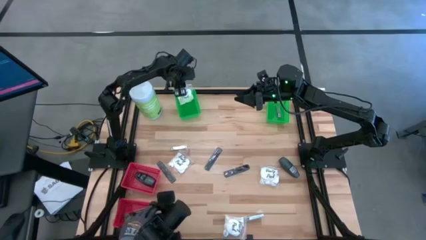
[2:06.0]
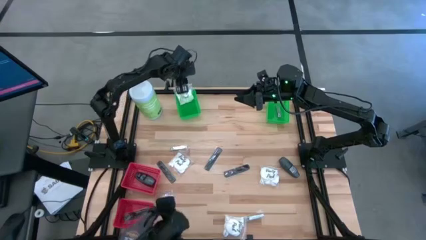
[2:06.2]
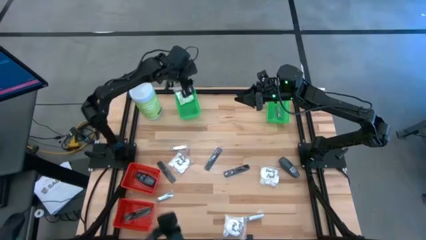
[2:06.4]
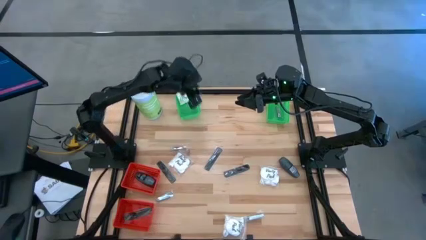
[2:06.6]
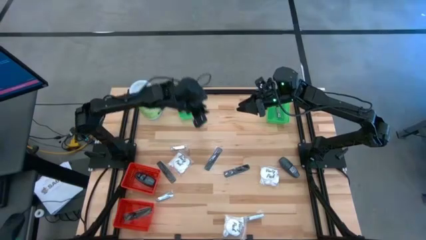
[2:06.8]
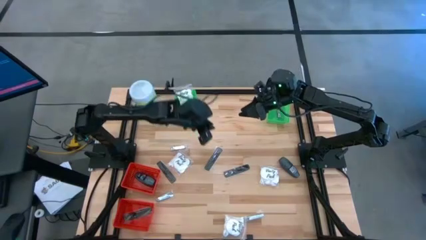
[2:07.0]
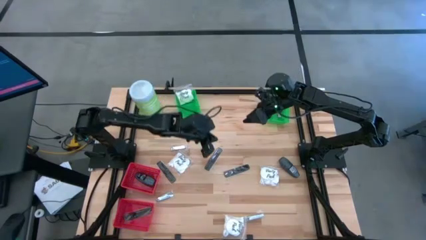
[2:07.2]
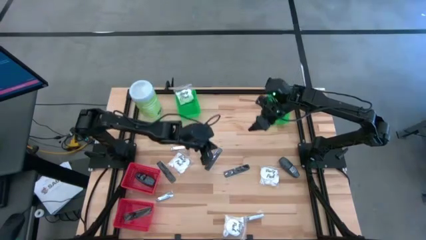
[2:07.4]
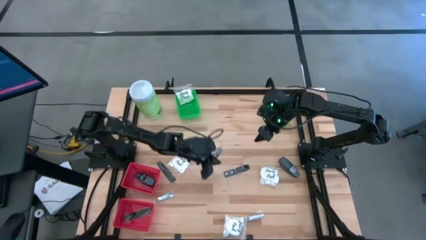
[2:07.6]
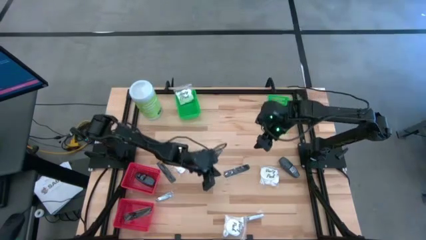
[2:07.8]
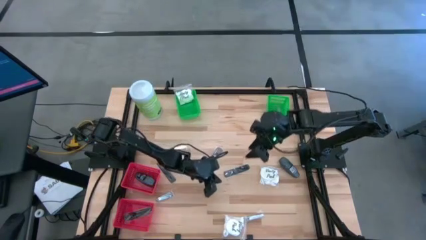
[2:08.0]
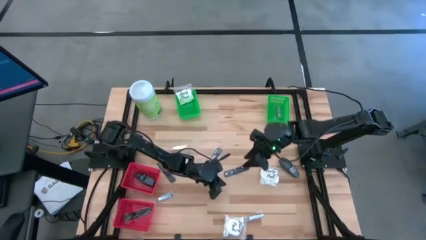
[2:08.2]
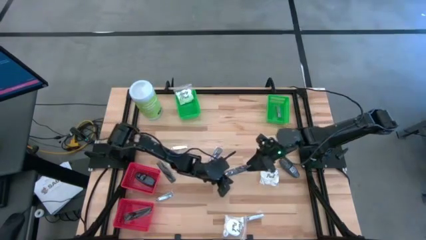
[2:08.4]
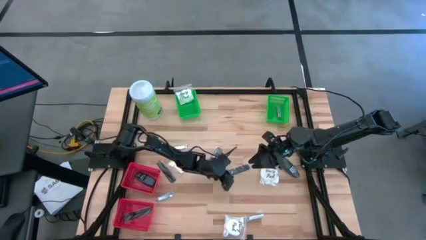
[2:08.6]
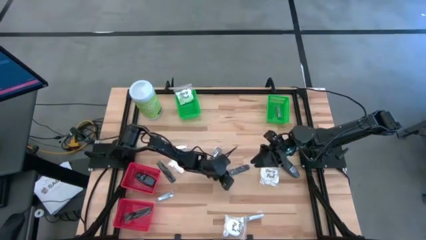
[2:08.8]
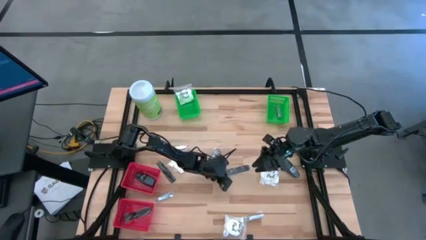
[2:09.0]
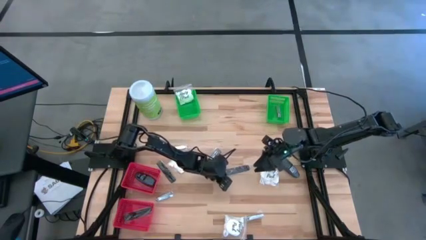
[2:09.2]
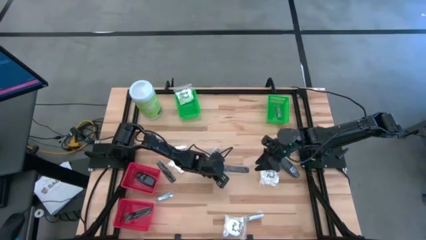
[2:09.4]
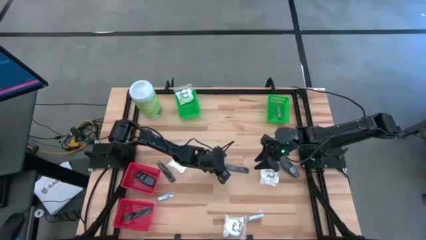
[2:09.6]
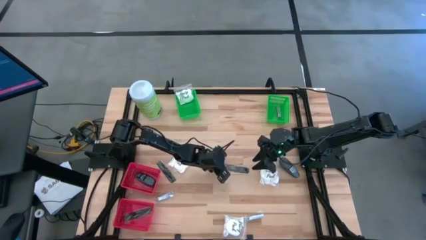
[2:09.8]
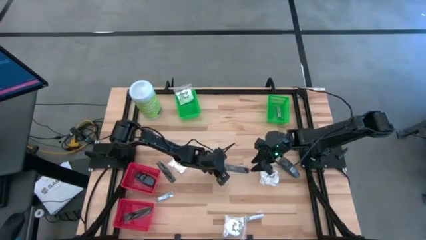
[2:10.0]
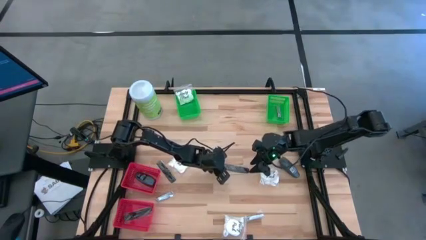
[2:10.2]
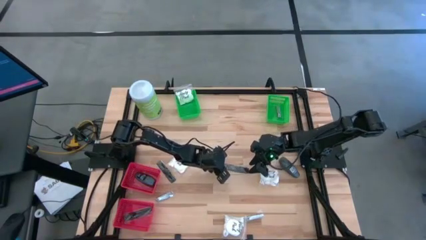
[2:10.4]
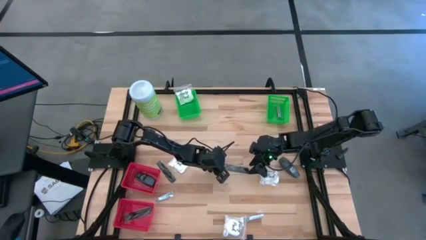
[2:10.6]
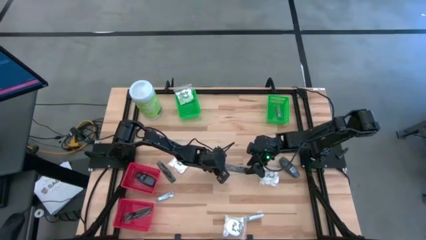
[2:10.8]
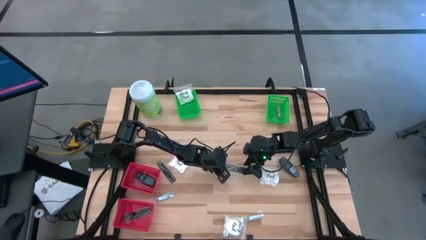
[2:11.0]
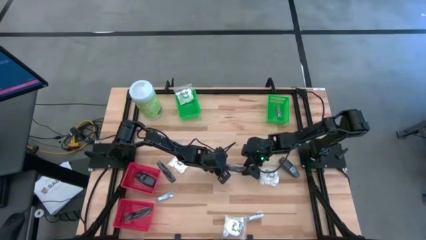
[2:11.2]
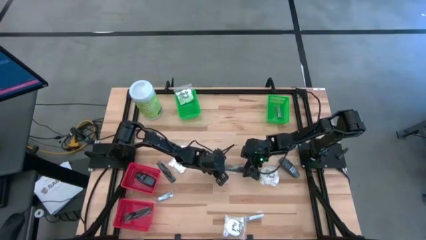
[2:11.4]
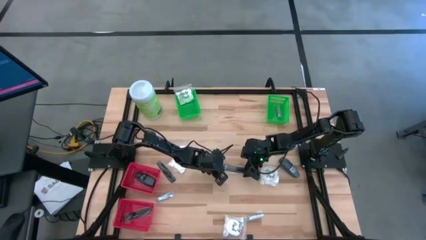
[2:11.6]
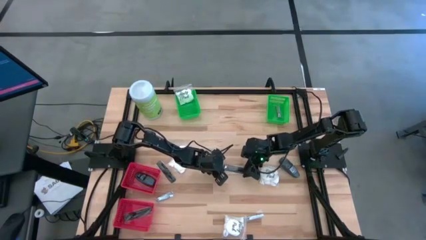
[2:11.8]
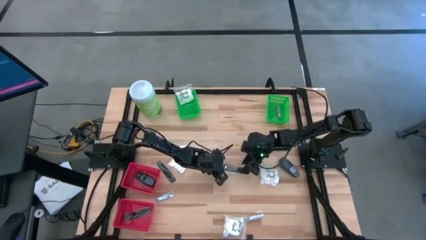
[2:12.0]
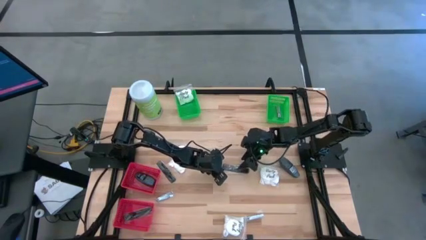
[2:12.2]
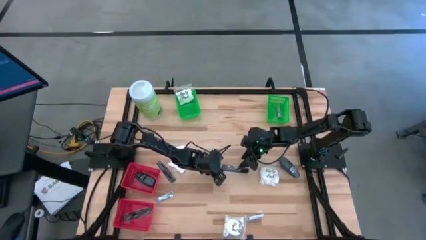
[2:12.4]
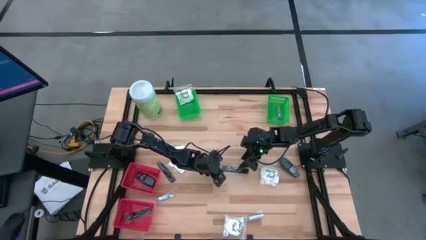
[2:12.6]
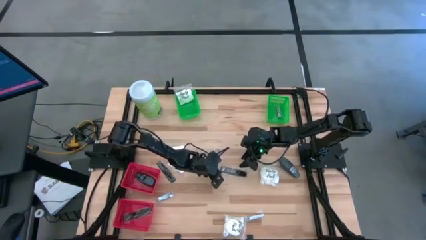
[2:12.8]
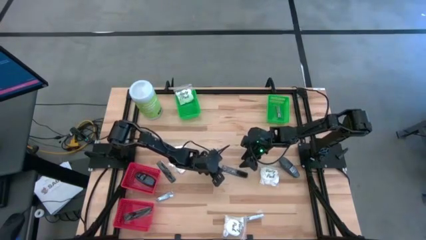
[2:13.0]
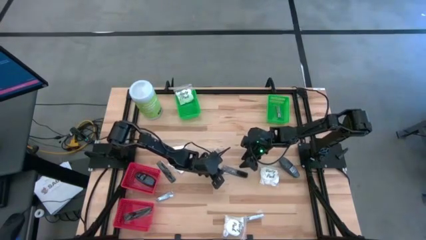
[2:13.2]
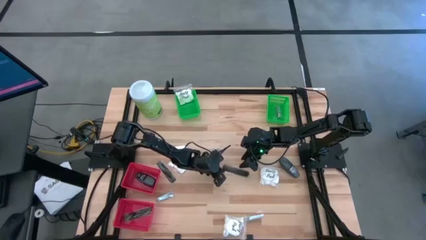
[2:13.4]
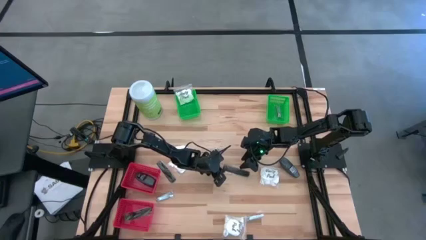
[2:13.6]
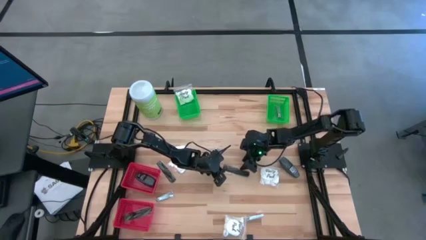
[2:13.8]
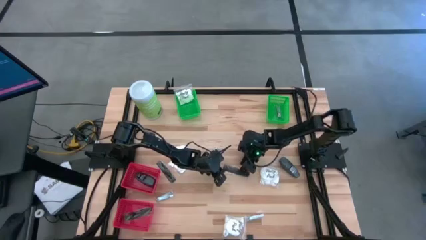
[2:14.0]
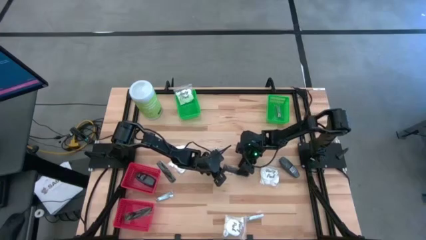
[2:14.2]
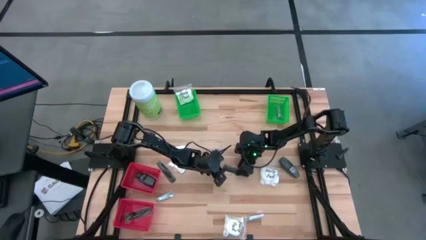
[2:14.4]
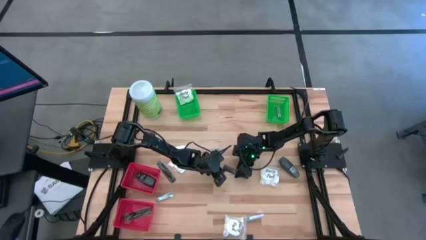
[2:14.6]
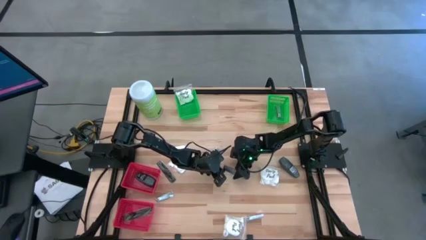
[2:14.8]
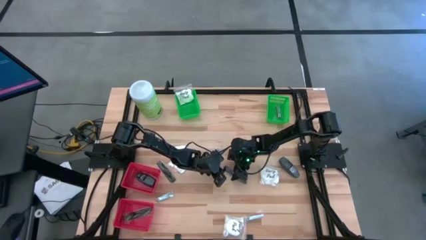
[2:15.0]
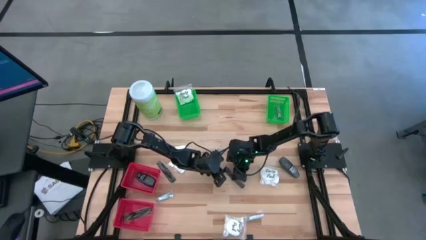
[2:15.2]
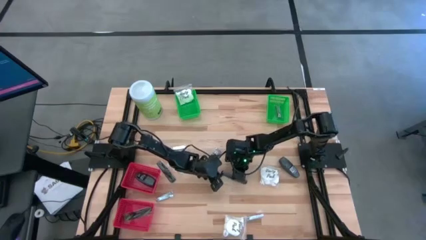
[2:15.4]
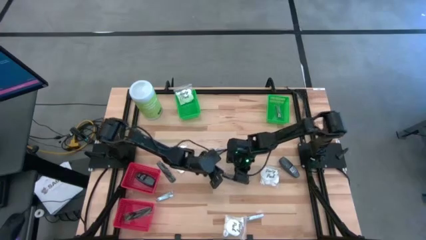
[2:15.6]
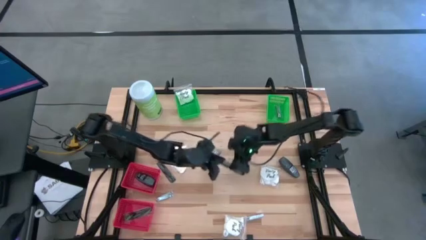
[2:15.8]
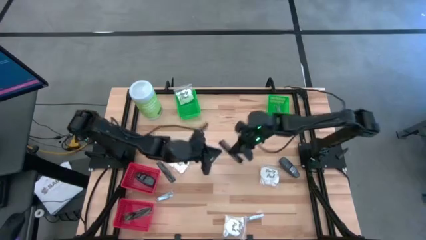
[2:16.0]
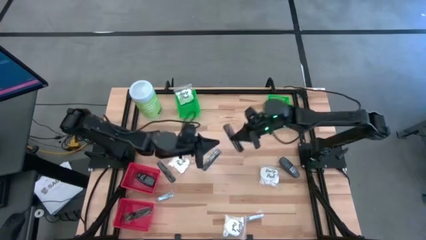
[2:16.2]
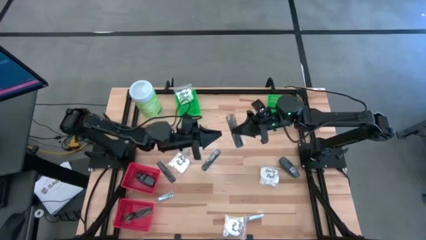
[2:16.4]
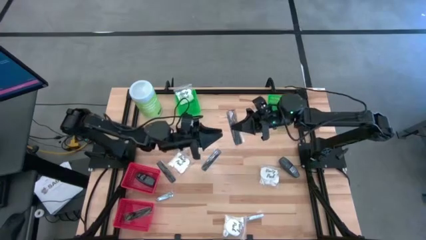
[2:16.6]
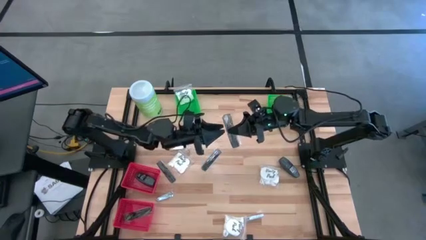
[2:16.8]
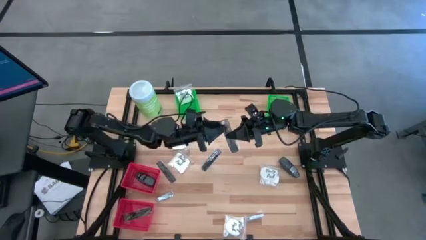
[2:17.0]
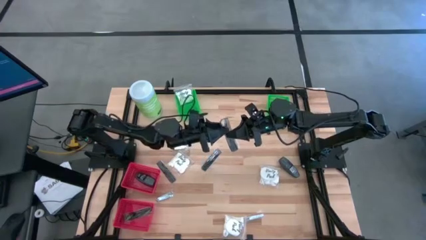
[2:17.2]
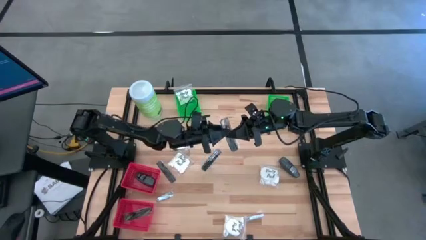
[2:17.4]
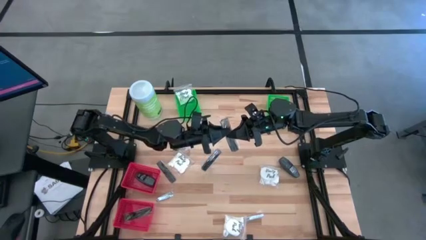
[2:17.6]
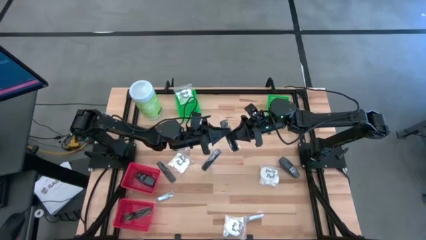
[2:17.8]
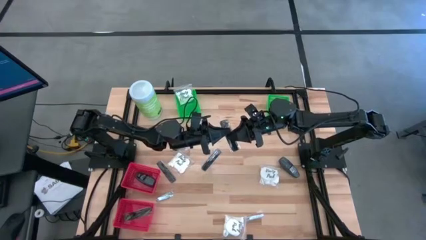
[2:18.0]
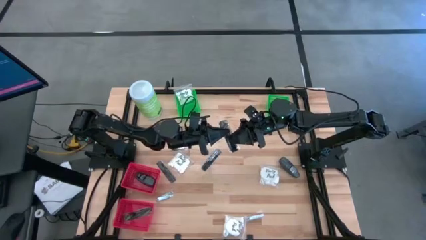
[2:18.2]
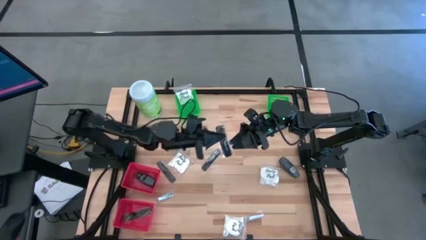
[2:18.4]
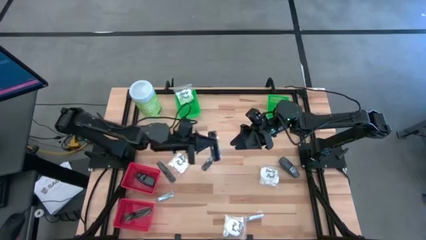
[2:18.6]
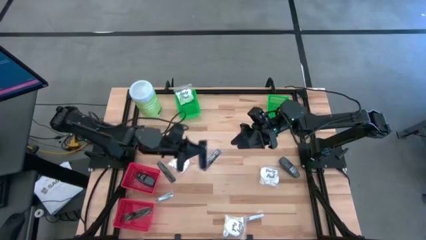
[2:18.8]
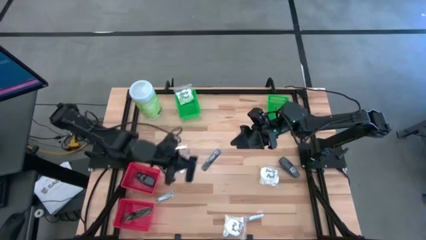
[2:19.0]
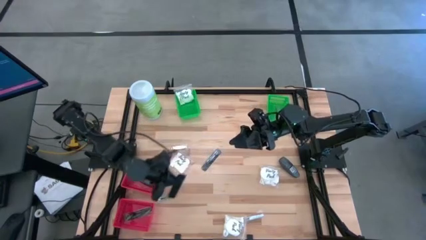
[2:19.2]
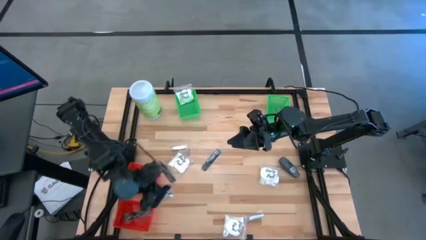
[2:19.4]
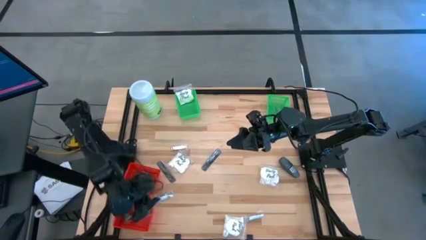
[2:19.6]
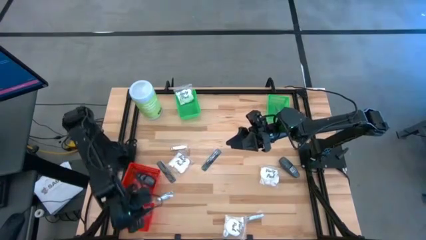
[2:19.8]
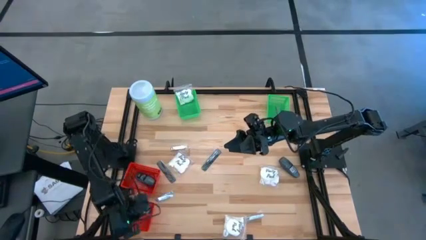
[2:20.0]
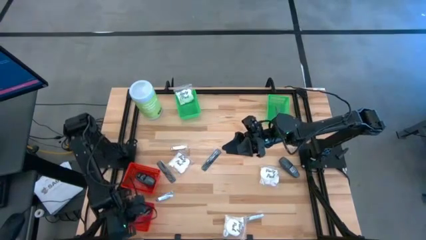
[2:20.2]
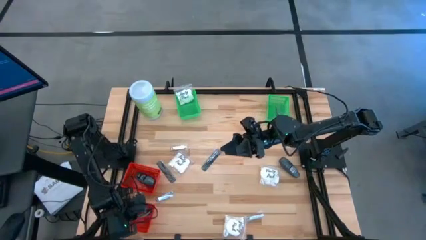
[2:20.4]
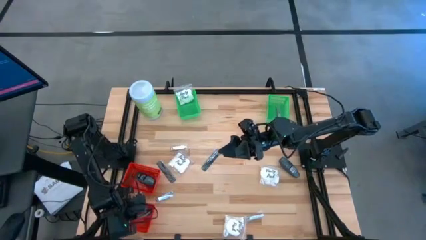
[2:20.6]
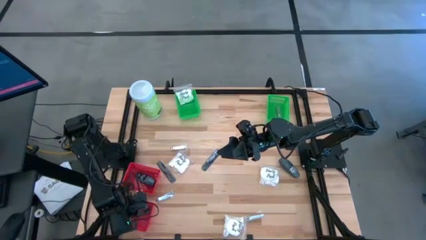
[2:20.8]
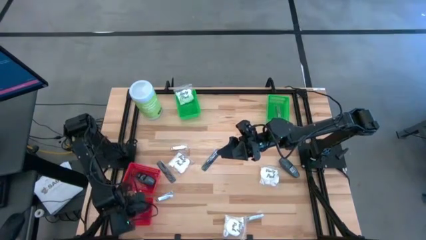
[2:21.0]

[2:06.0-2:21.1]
Task: Pick & Place Travel size toiletries
Put the black comb into the bottom red basket
